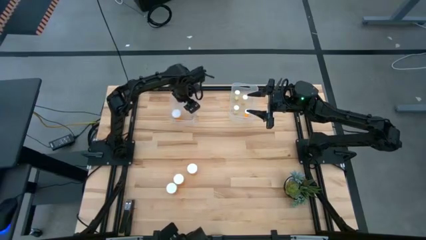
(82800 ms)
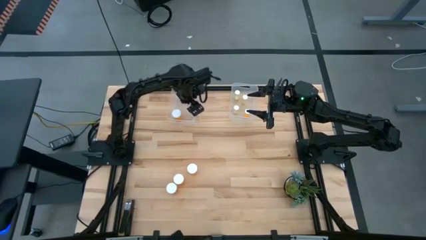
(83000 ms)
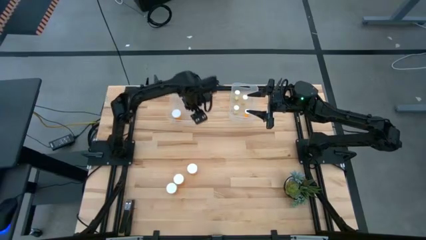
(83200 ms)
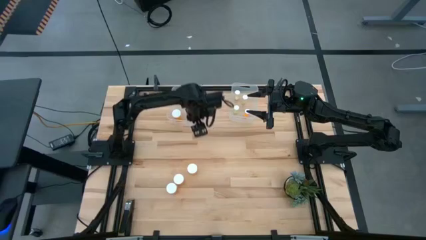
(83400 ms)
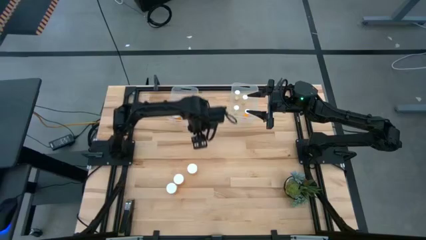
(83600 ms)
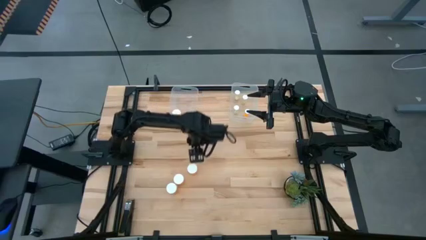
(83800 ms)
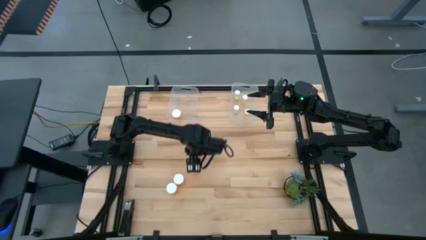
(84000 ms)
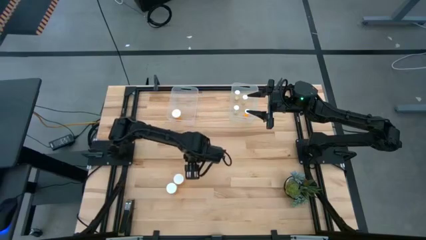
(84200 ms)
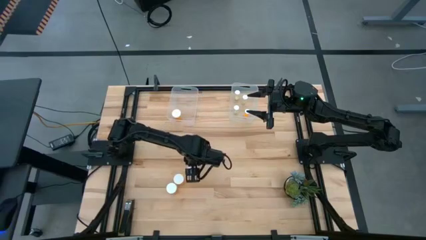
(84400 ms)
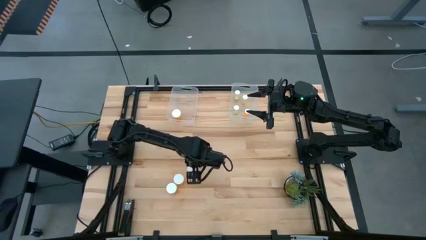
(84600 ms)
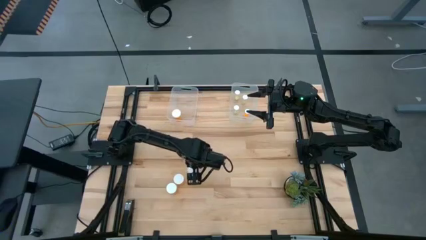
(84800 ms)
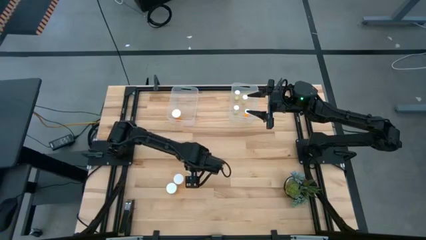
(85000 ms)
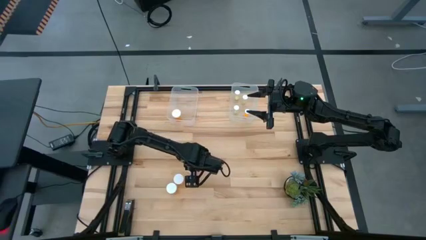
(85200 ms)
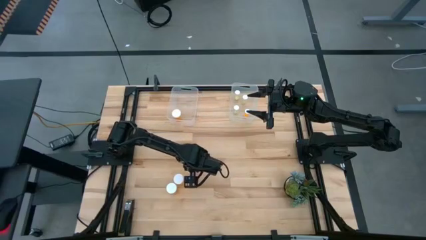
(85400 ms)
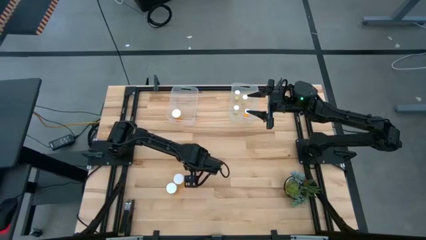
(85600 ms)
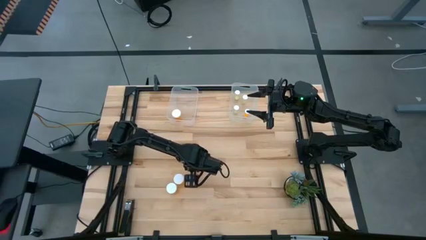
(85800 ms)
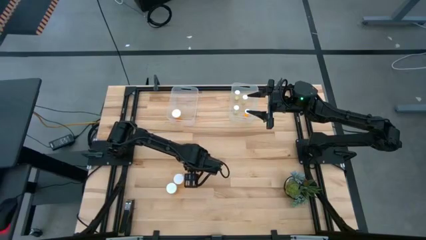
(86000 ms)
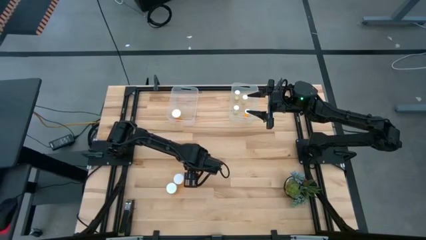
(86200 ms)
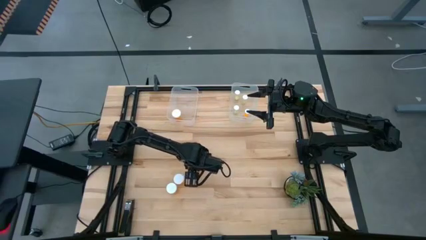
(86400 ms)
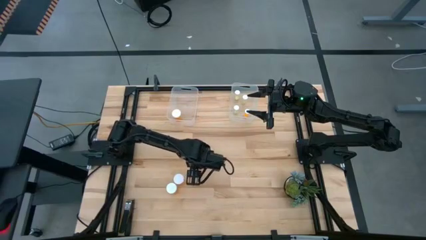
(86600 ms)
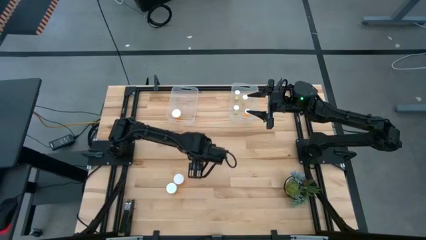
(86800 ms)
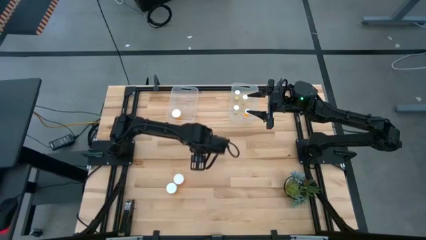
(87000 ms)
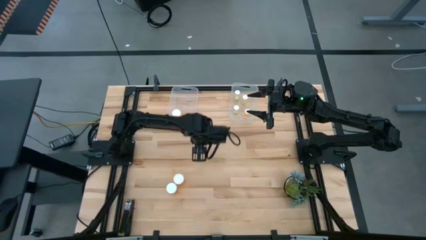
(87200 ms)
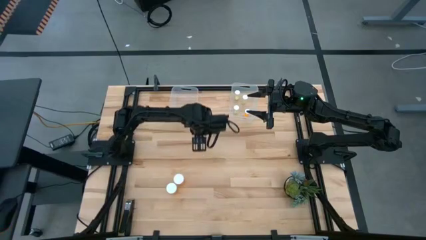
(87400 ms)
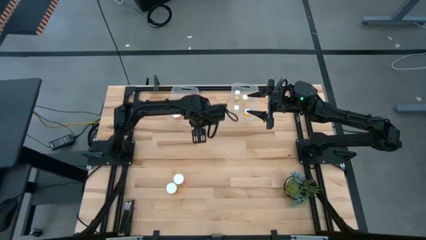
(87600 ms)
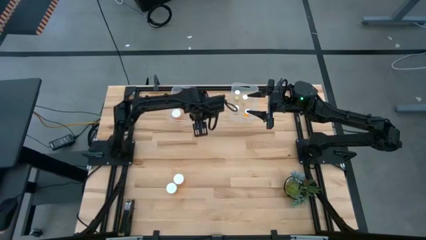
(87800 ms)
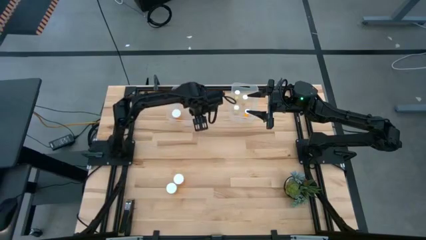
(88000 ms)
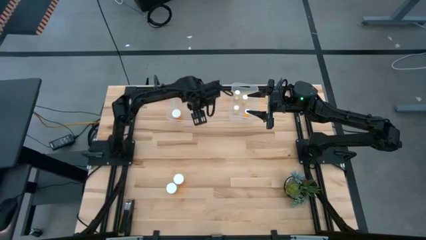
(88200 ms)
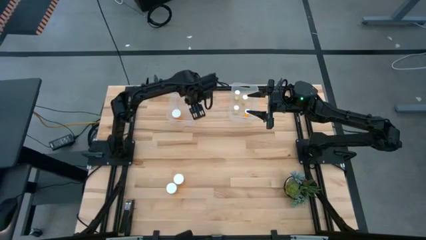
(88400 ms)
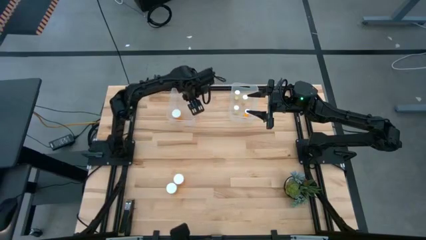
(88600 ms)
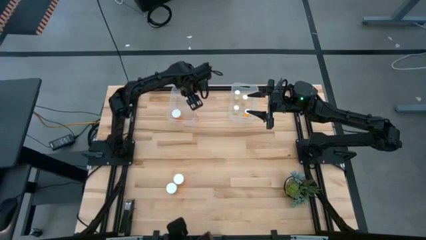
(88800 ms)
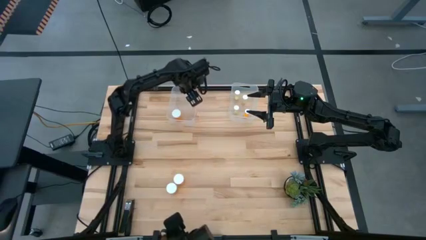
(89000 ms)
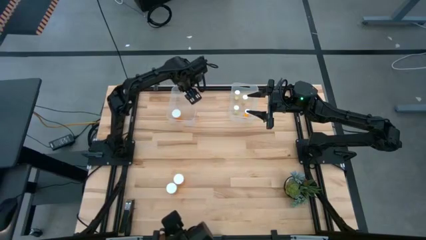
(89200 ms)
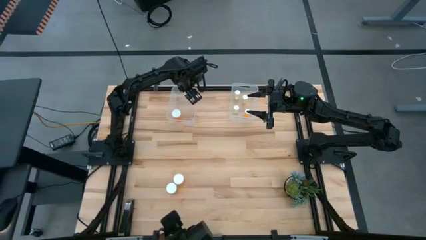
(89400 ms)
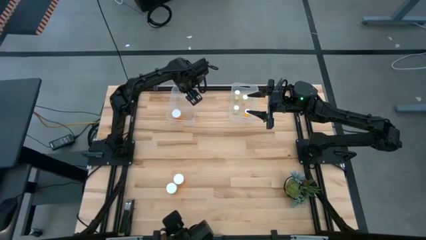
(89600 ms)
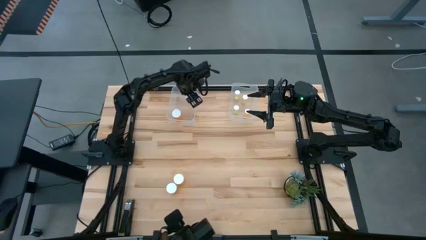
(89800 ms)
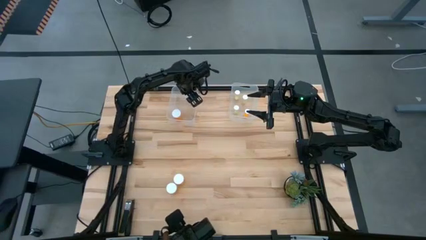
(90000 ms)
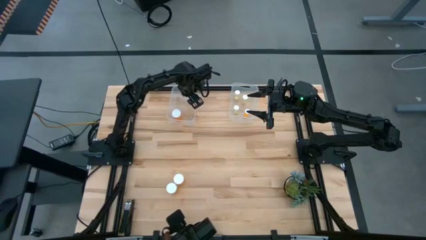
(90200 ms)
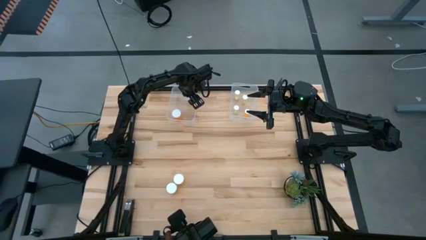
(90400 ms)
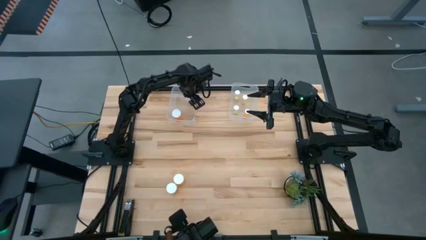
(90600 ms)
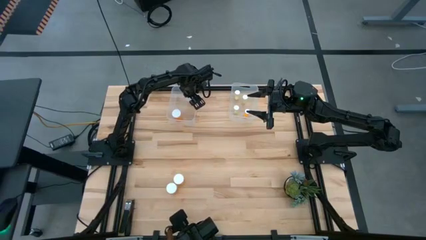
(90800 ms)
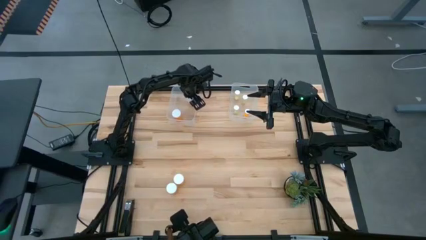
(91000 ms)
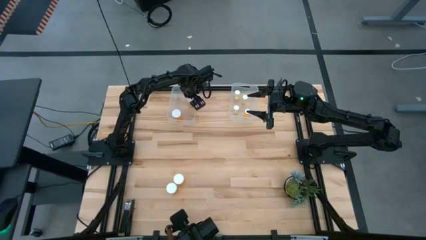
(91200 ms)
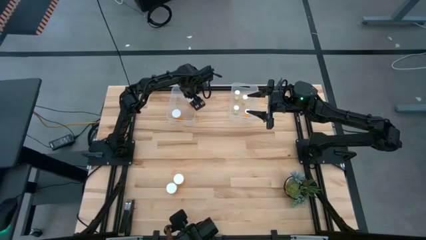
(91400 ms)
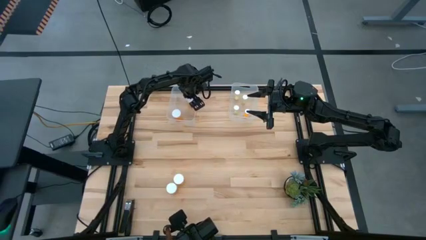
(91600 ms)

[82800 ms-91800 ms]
Task: Pick and place medicine bottles into bin by pill shape (circle, oval)
Put the top big orange pill bottle into the left transparent bin

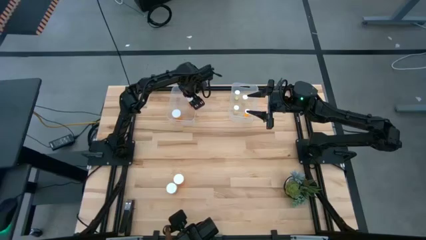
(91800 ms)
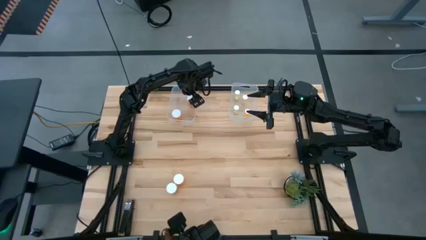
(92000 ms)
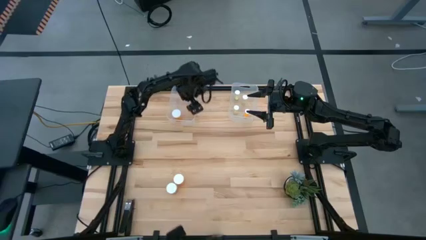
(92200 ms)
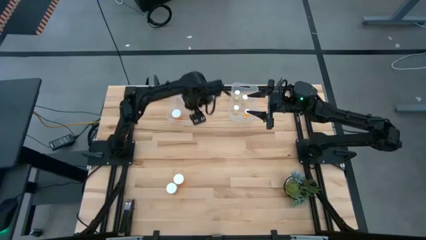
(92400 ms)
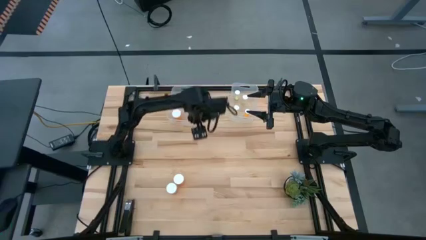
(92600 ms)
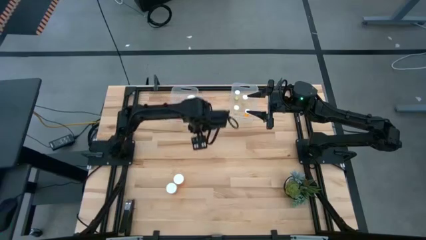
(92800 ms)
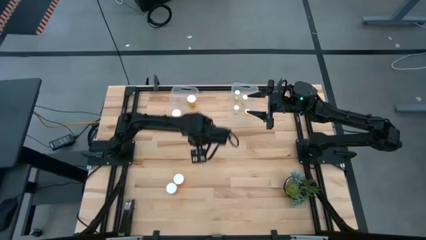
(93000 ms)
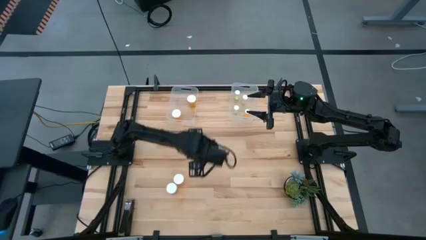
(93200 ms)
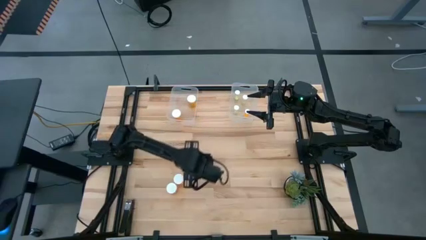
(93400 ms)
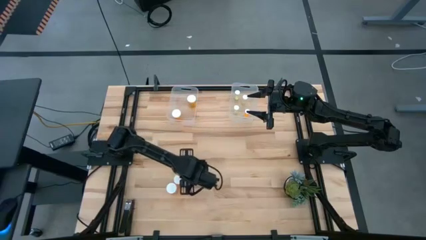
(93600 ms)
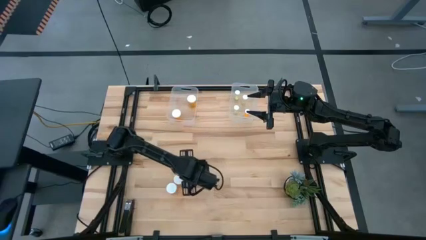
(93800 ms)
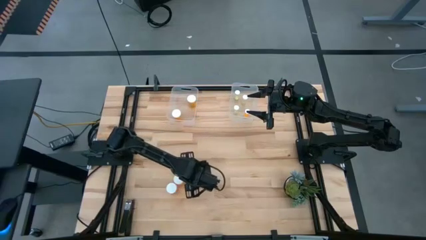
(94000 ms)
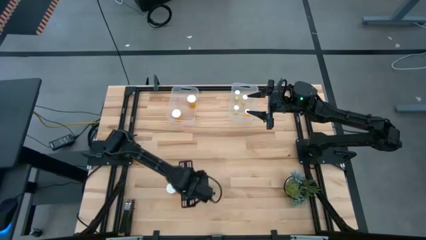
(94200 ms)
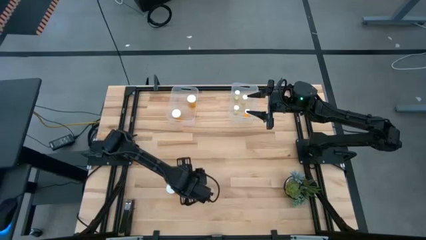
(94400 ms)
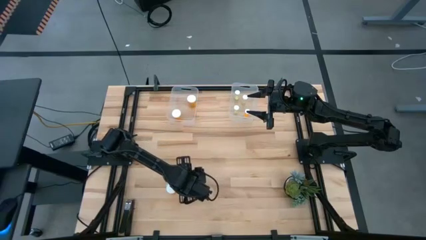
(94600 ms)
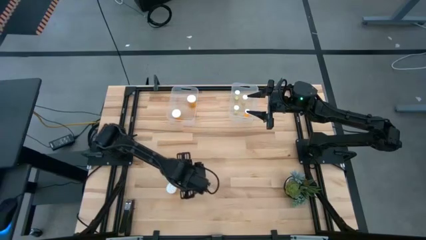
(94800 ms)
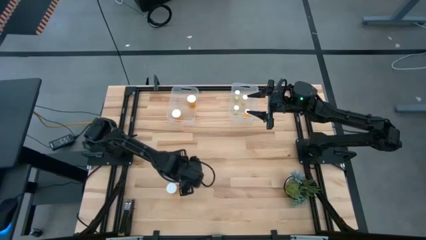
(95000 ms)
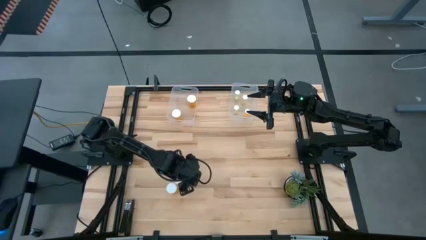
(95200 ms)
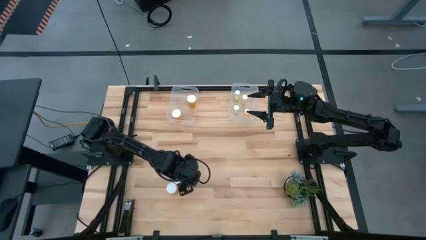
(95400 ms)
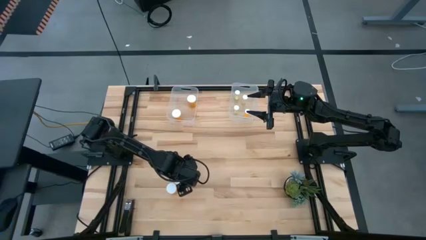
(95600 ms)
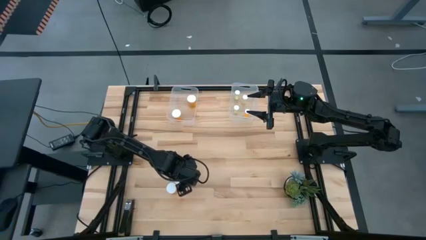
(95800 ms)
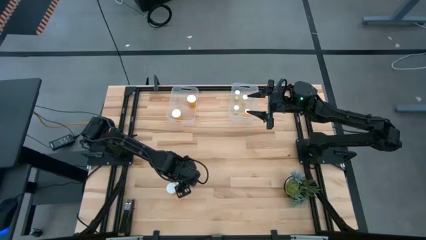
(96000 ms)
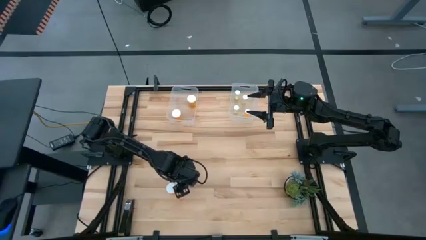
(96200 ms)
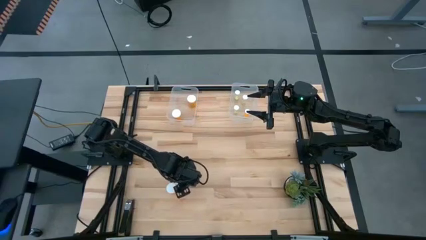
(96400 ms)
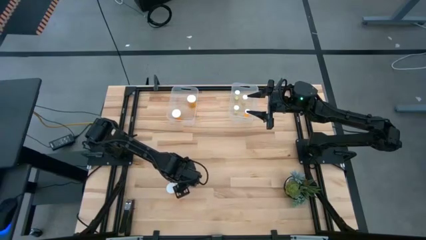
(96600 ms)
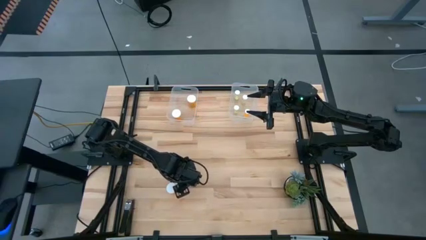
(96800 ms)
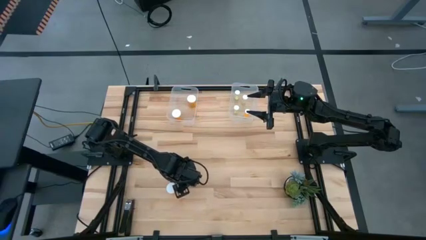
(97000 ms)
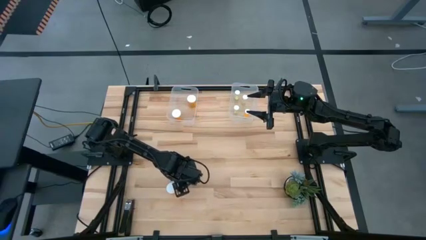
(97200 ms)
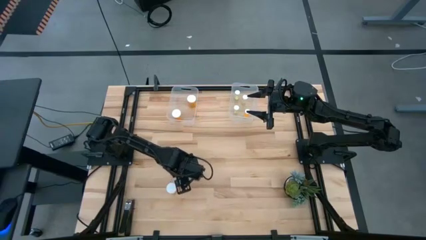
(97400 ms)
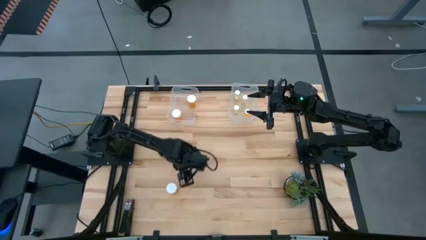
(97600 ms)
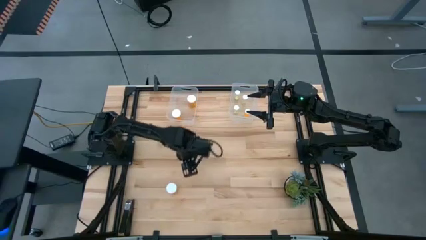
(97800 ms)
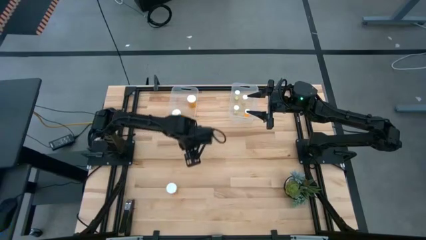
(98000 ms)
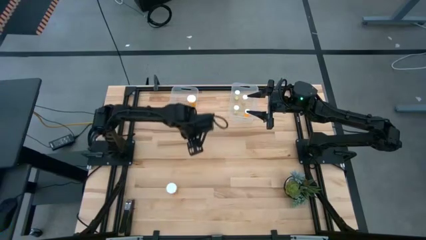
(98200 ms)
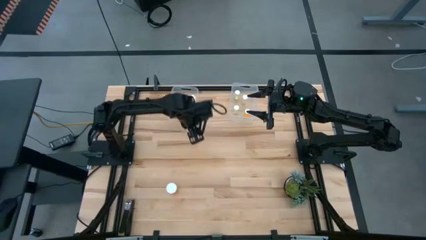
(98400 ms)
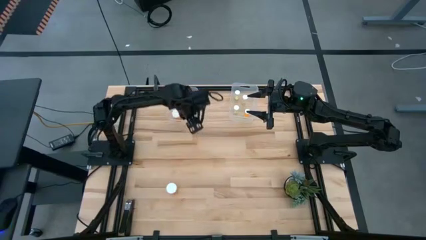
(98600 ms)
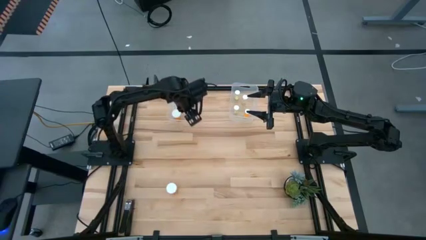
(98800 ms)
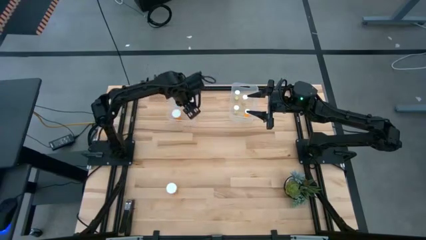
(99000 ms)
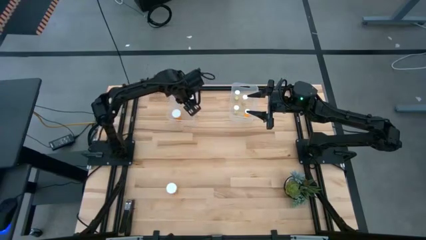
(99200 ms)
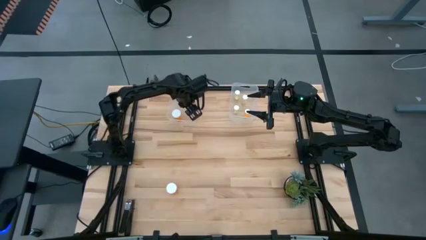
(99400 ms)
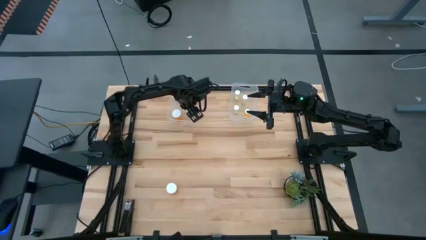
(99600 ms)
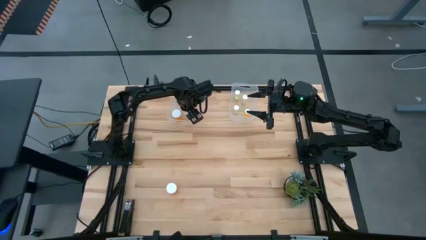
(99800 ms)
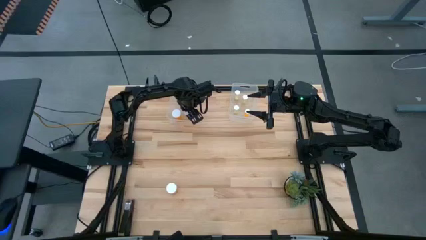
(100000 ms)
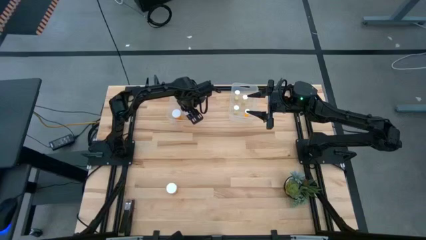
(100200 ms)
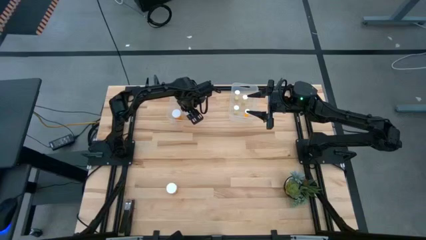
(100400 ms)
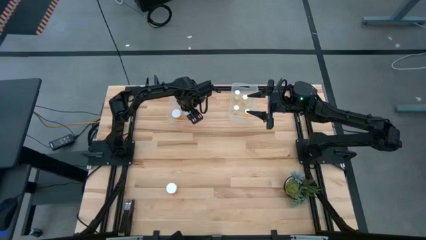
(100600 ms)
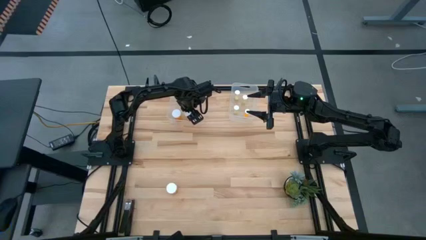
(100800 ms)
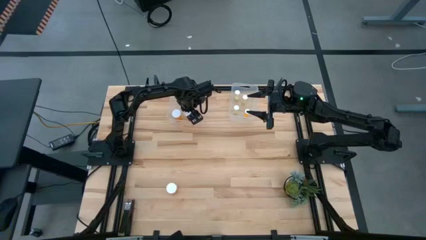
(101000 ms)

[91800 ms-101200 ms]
Put the top big orange pill bottle into the left transparent bin
